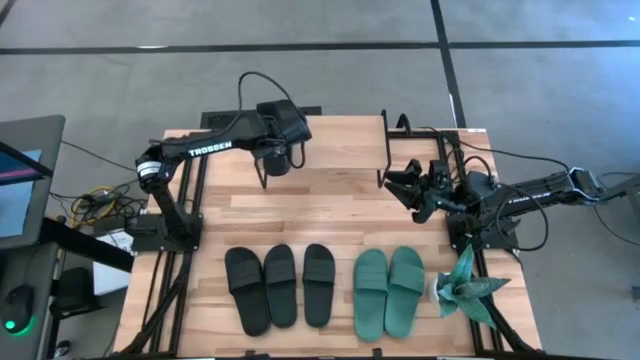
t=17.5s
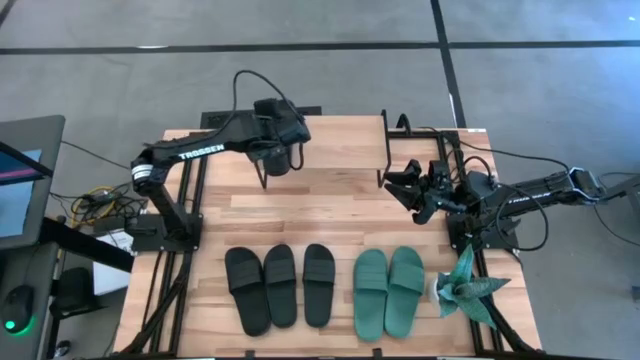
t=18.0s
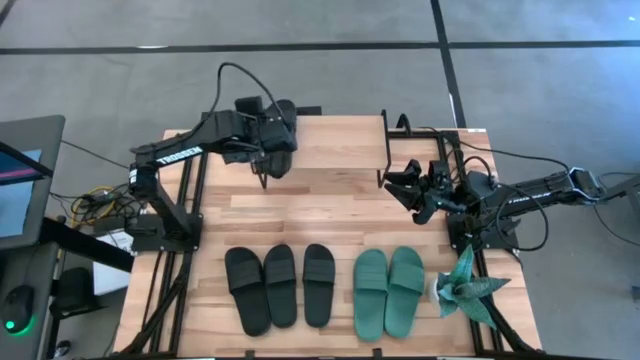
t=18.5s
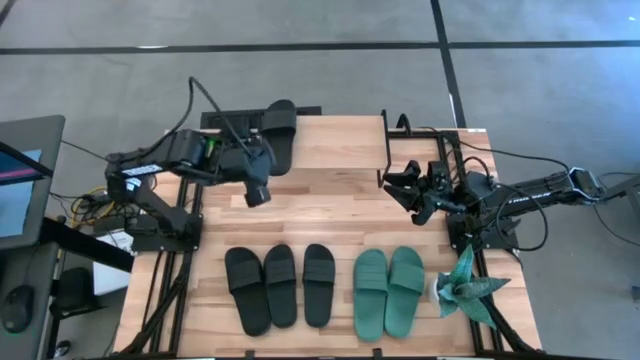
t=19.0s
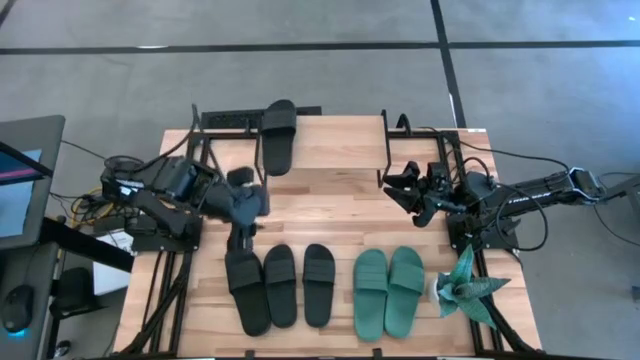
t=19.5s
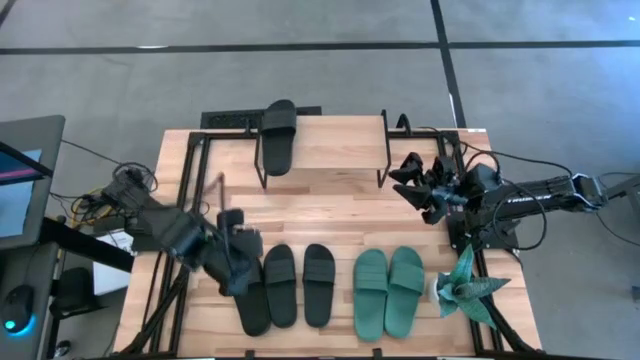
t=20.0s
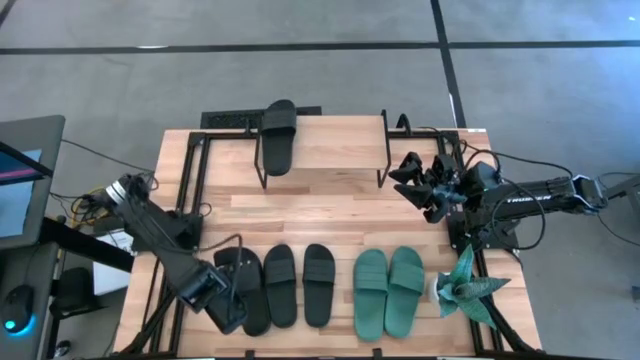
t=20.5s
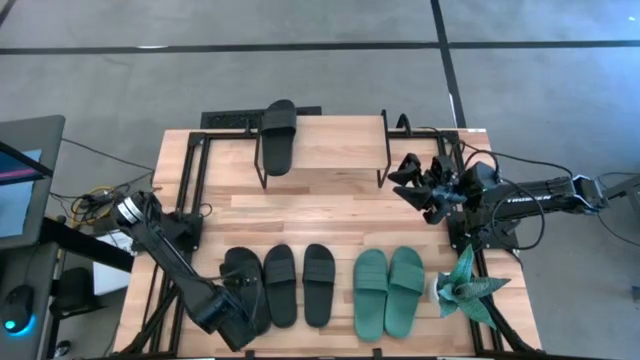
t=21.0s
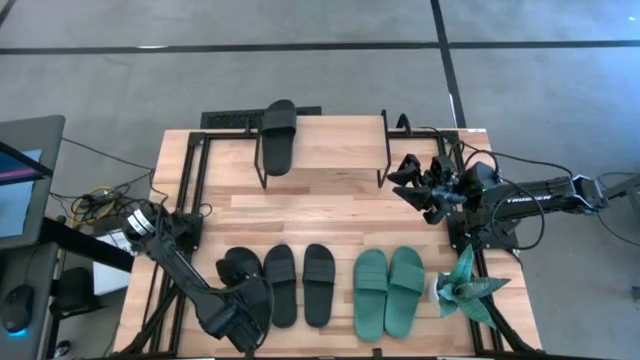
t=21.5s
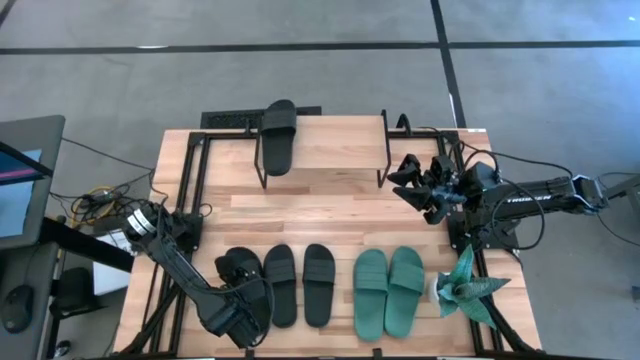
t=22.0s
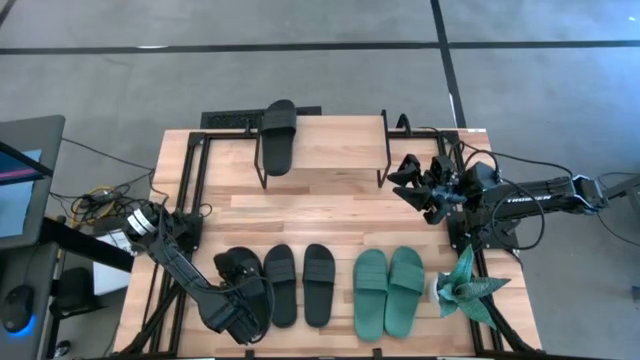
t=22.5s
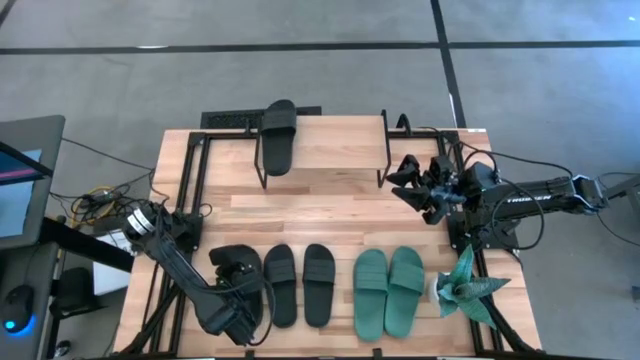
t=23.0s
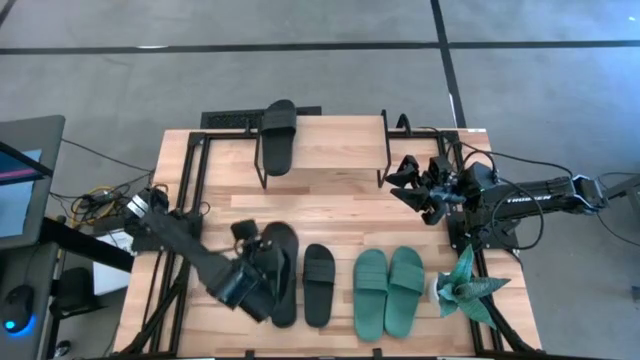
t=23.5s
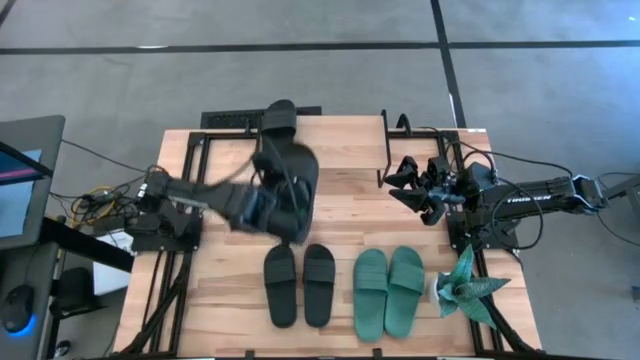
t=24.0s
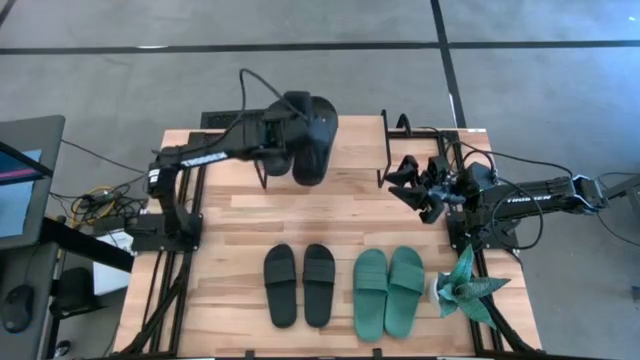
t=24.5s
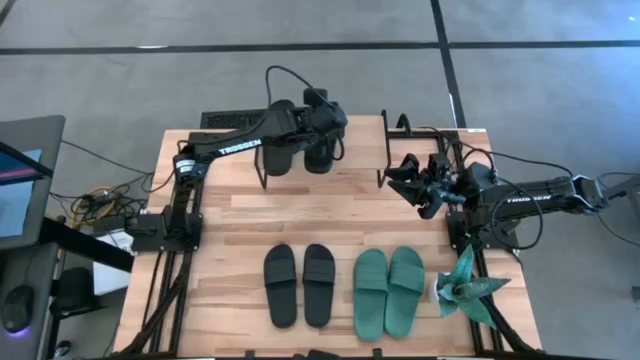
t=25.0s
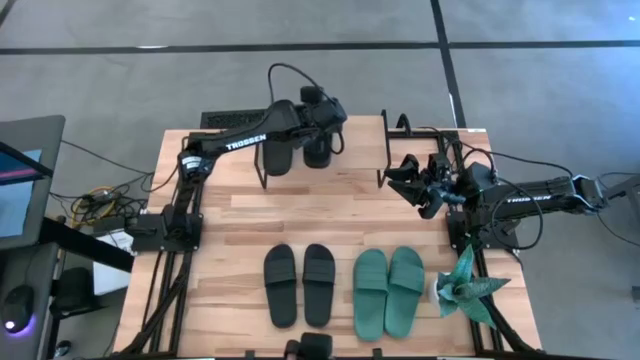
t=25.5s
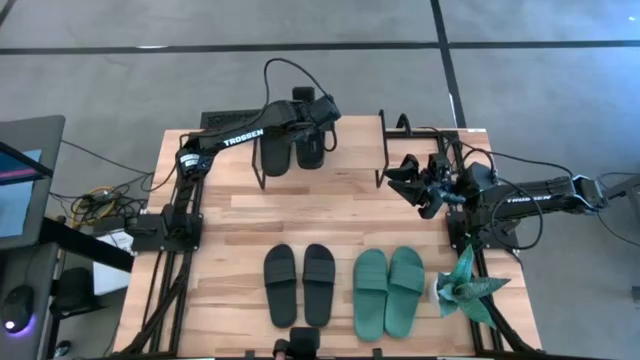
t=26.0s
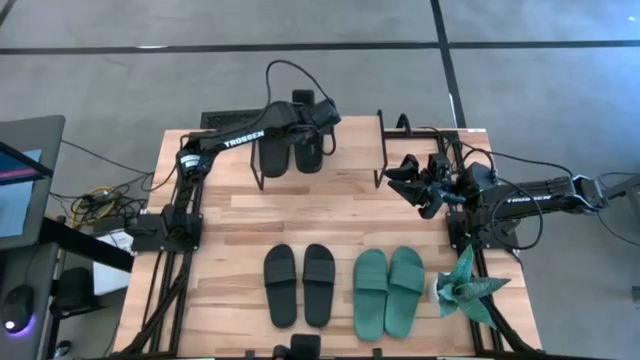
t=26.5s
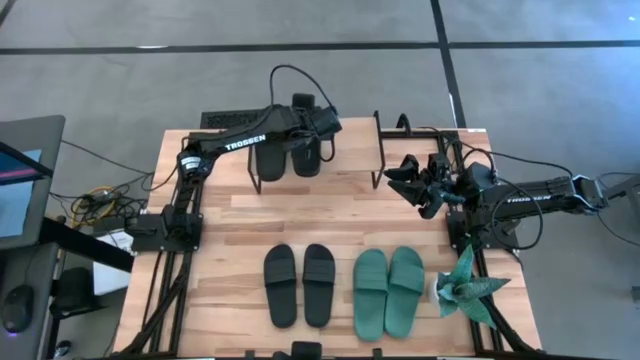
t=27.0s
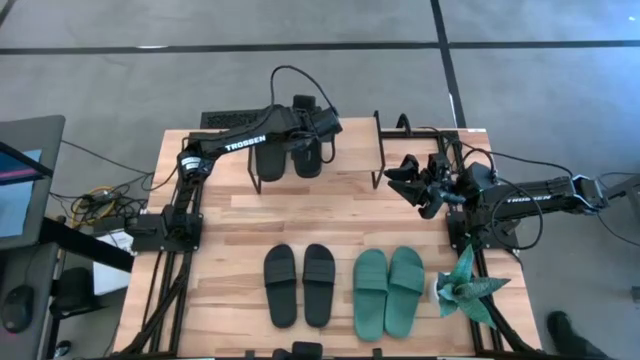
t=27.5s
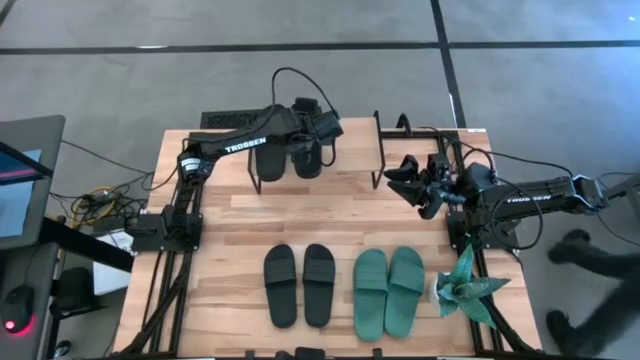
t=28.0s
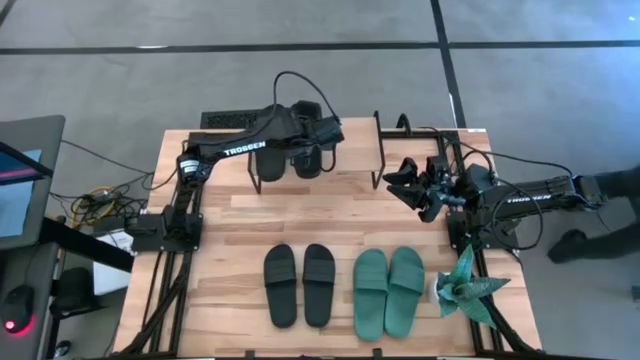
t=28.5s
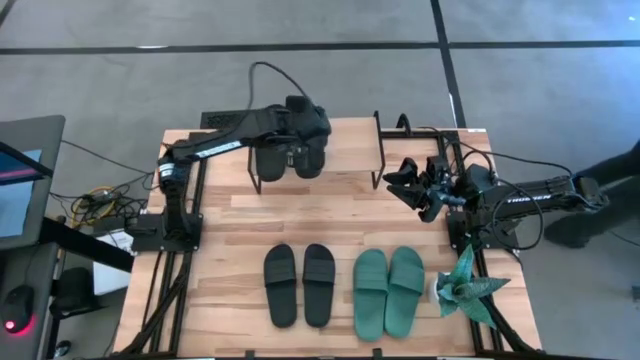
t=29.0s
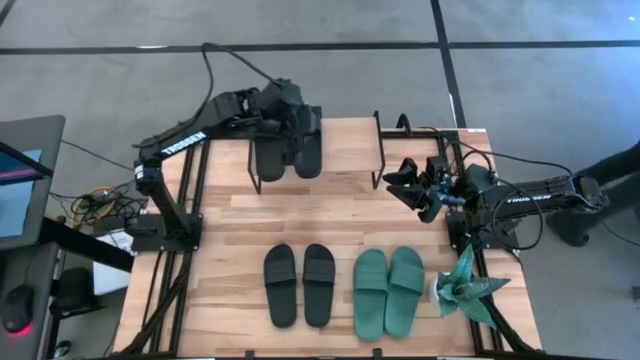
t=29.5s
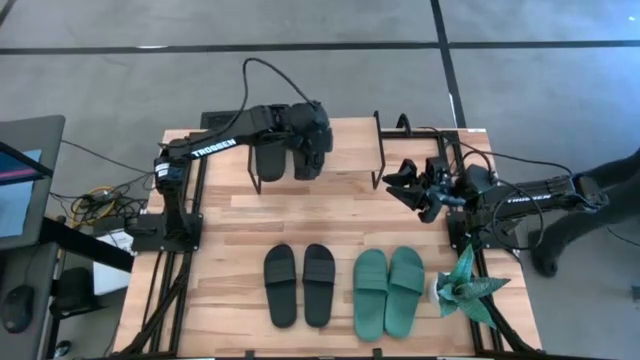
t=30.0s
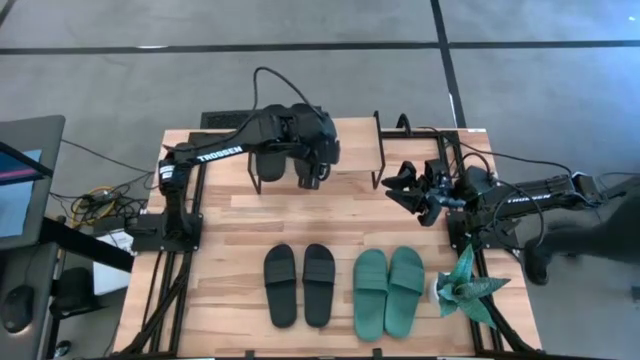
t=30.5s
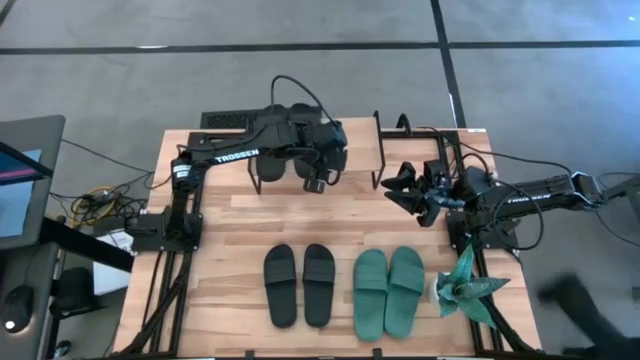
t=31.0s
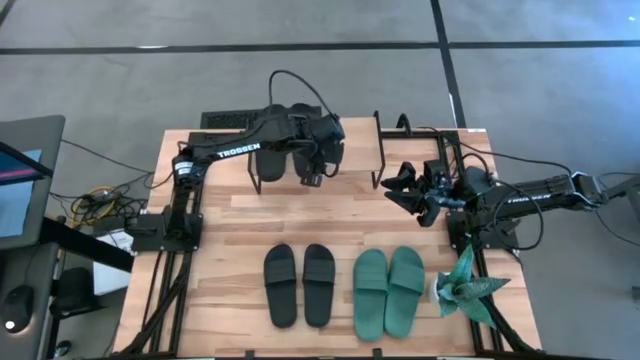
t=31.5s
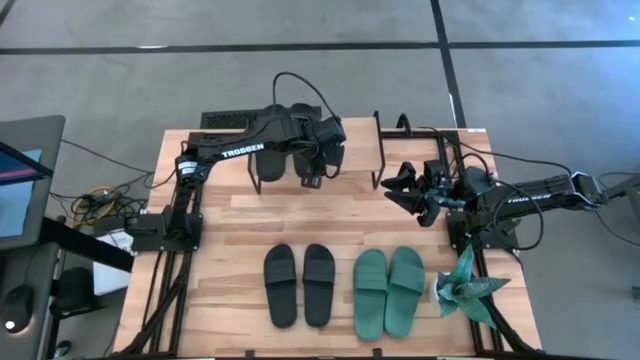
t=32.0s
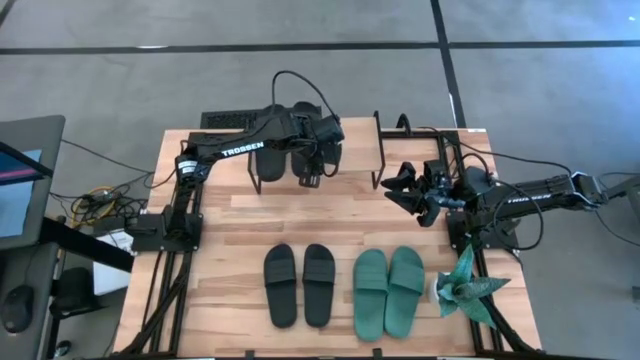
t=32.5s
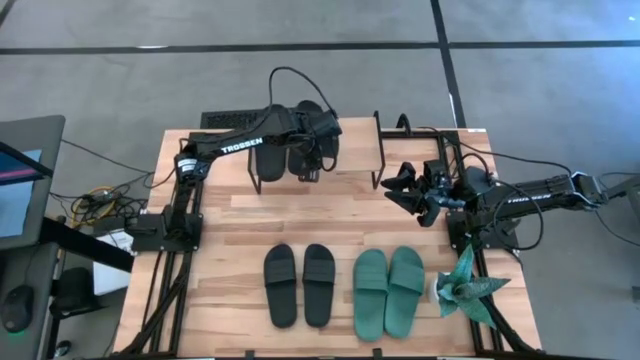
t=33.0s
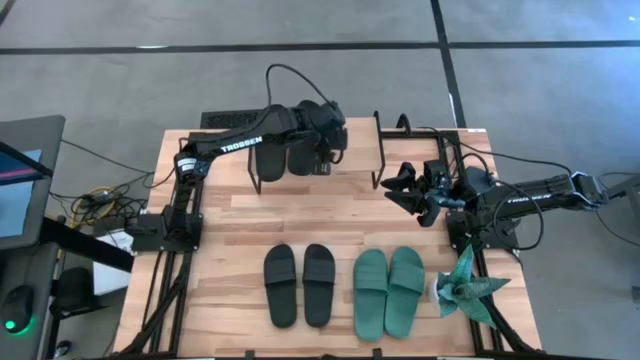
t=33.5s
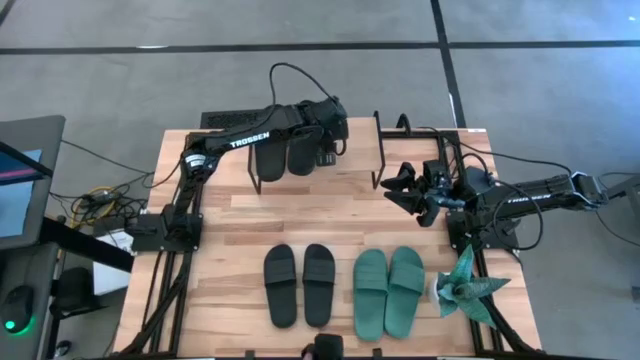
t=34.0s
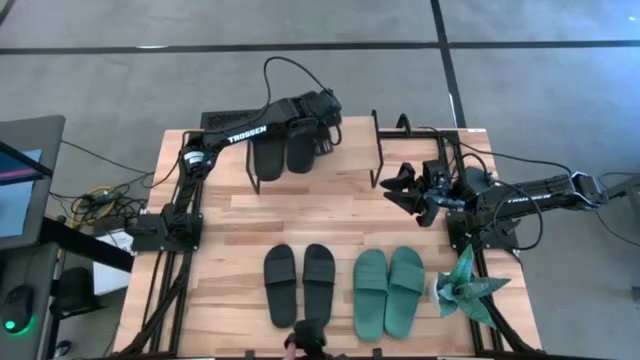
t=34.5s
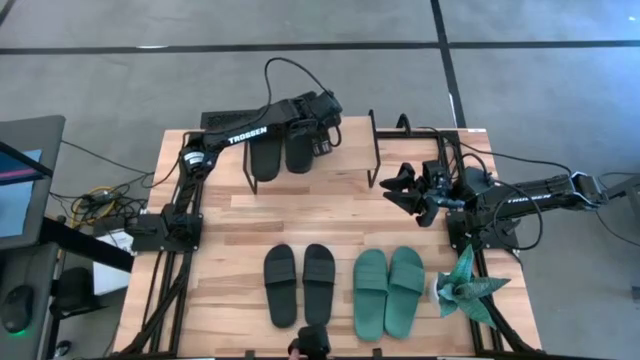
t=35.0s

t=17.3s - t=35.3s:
Task: Pick and place slides into the shelf
Put the black slipper on the shelf

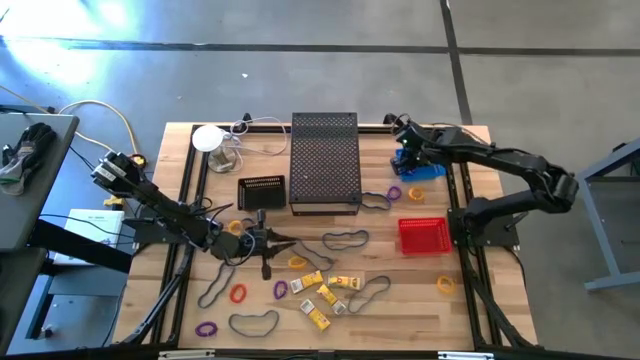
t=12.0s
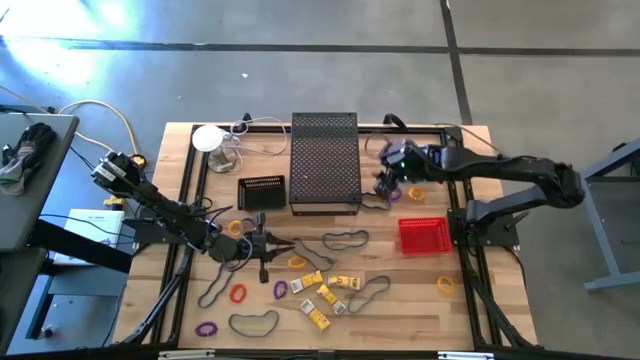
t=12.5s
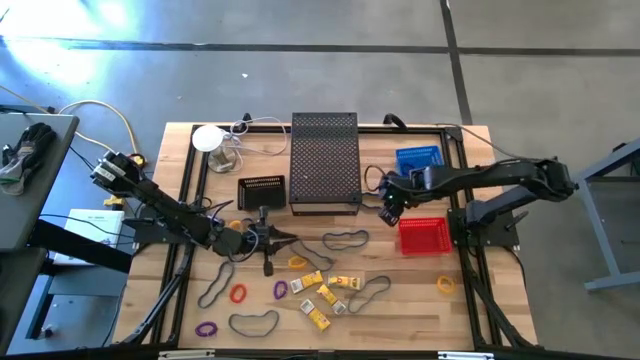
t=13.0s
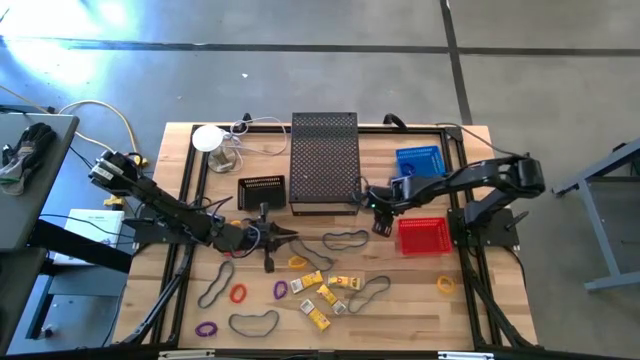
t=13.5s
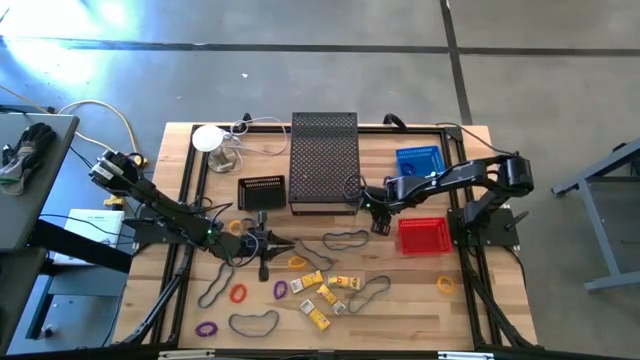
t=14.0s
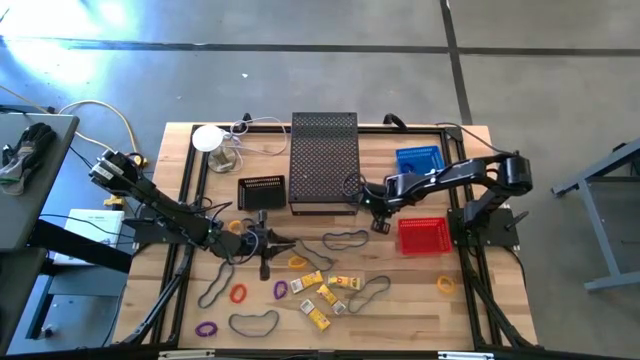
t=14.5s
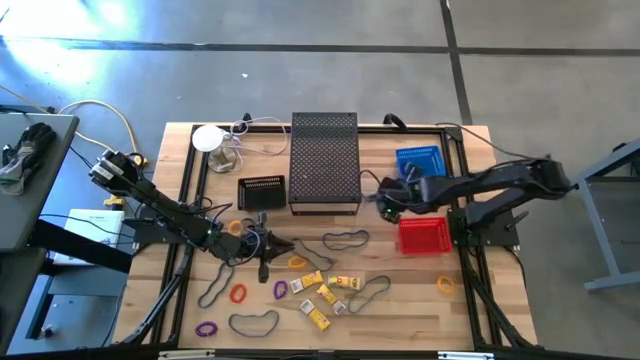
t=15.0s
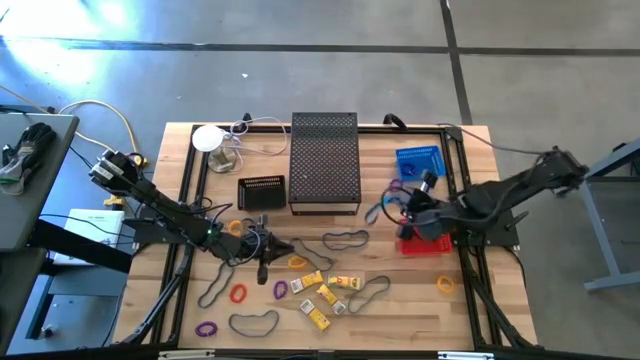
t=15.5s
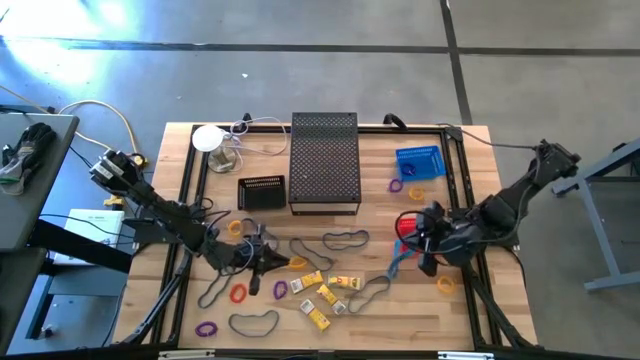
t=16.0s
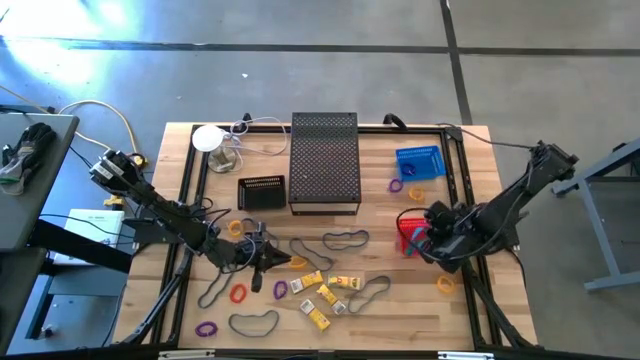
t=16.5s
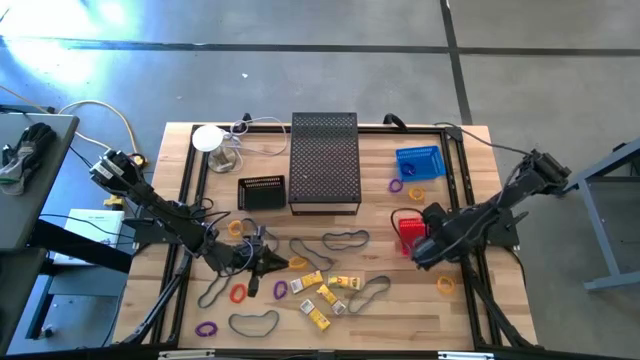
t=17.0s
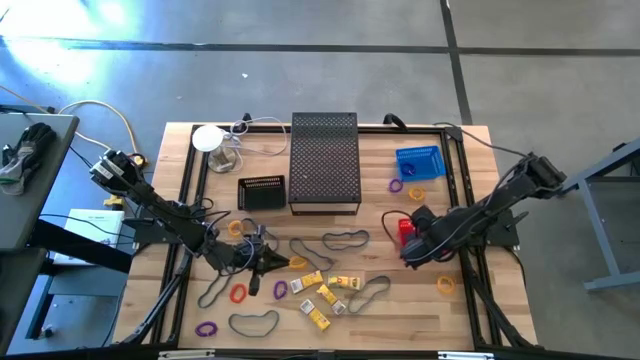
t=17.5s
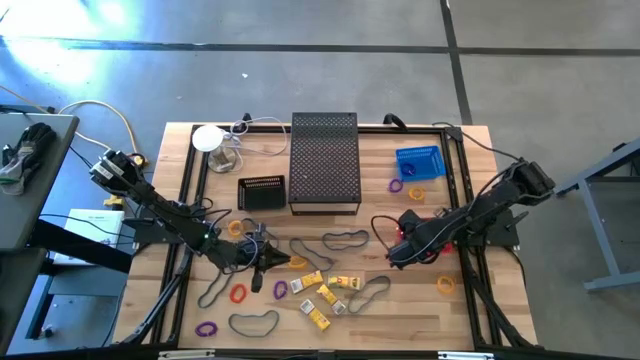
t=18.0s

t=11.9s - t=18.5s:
Task: Pick & Place Office Desk Supplies
Put the blue rubber band into the red bin
